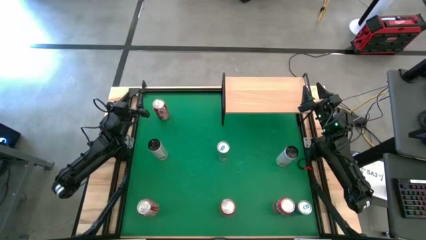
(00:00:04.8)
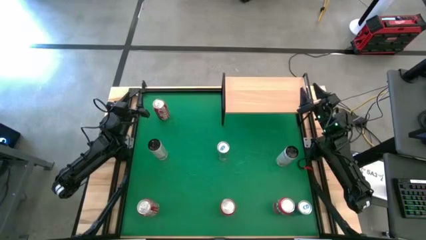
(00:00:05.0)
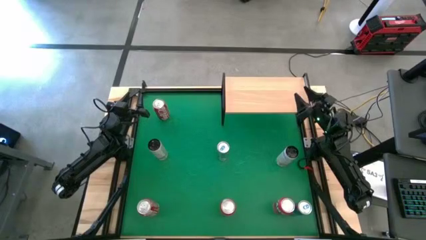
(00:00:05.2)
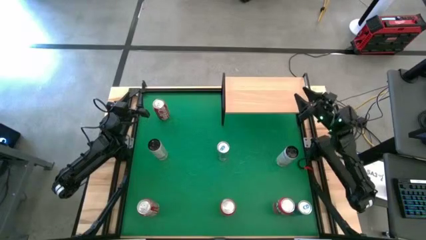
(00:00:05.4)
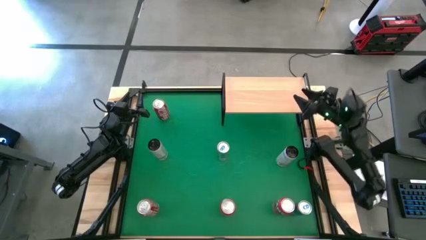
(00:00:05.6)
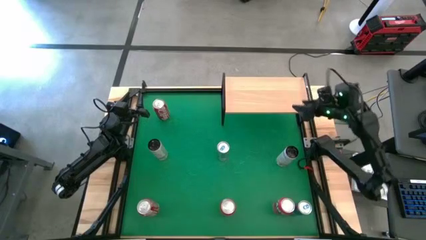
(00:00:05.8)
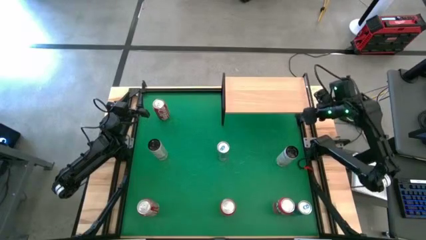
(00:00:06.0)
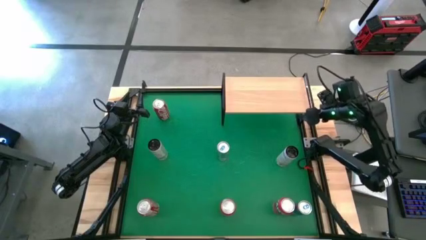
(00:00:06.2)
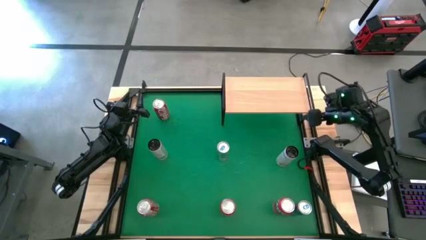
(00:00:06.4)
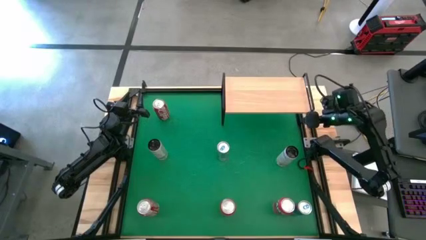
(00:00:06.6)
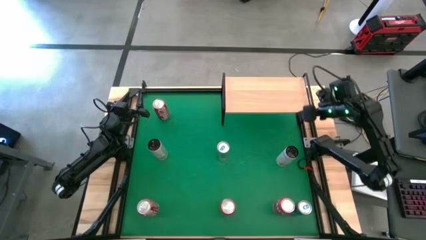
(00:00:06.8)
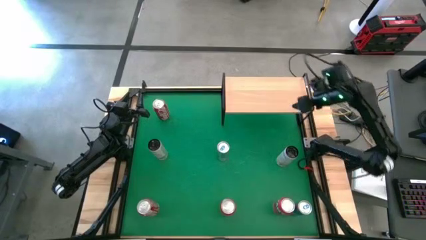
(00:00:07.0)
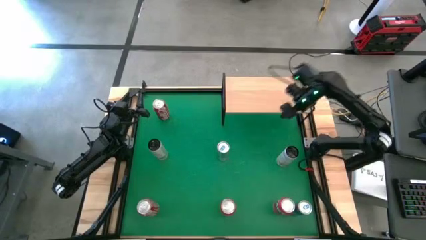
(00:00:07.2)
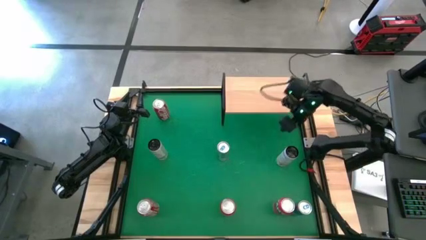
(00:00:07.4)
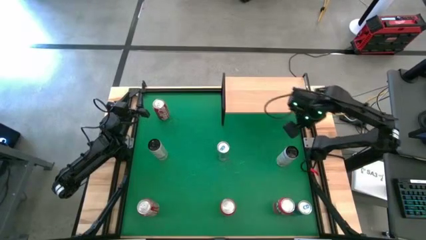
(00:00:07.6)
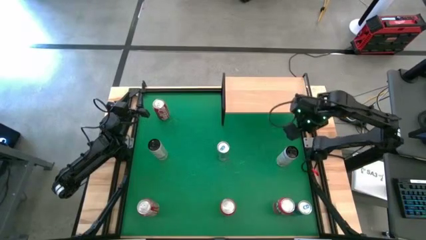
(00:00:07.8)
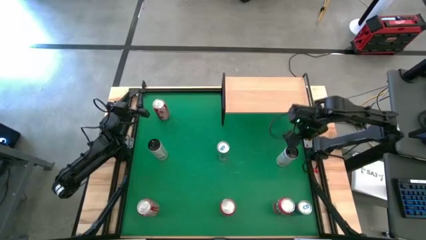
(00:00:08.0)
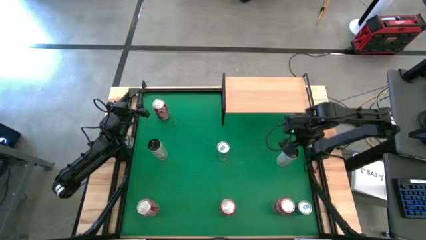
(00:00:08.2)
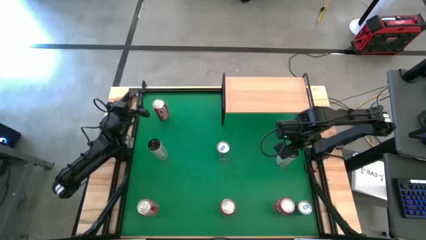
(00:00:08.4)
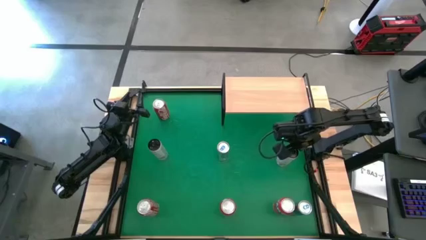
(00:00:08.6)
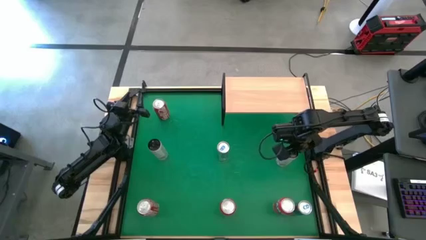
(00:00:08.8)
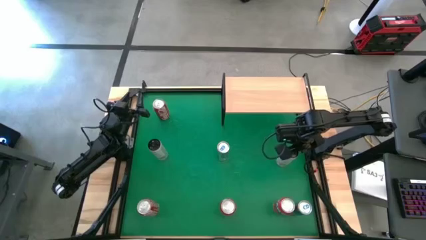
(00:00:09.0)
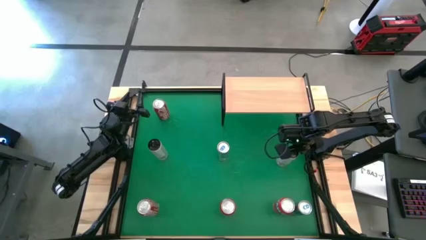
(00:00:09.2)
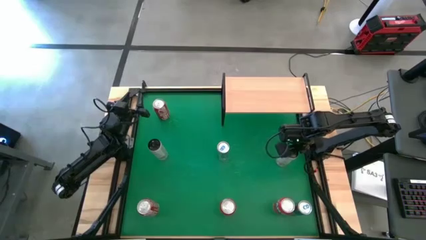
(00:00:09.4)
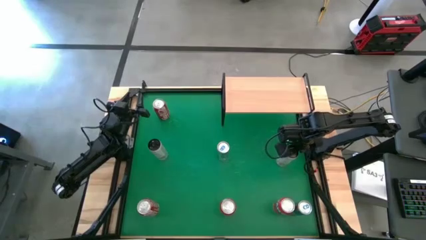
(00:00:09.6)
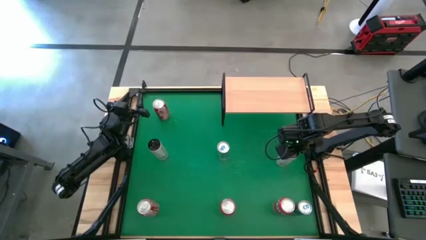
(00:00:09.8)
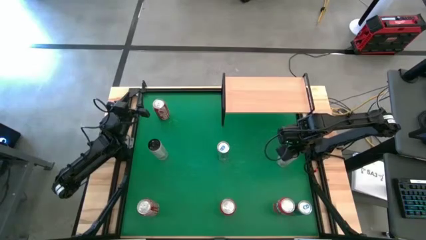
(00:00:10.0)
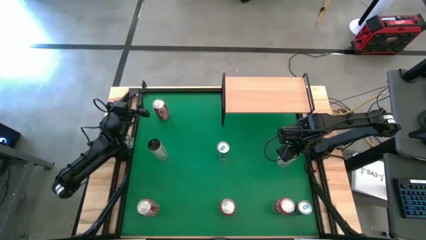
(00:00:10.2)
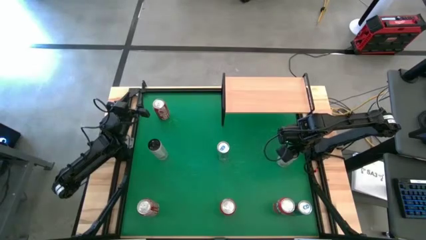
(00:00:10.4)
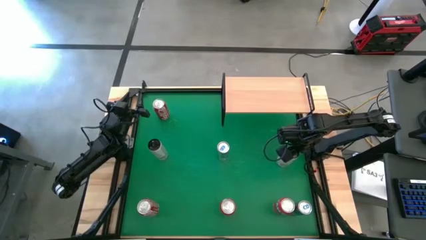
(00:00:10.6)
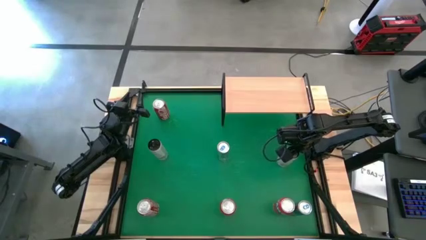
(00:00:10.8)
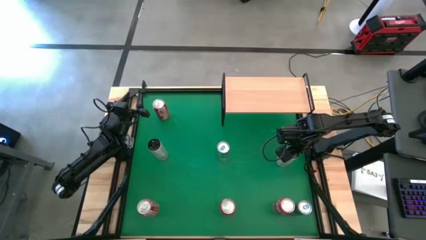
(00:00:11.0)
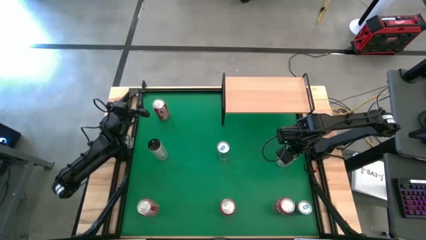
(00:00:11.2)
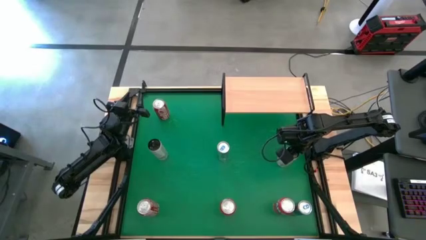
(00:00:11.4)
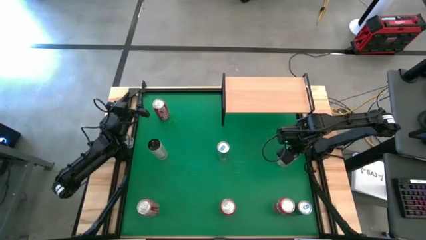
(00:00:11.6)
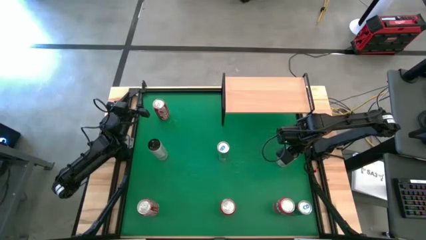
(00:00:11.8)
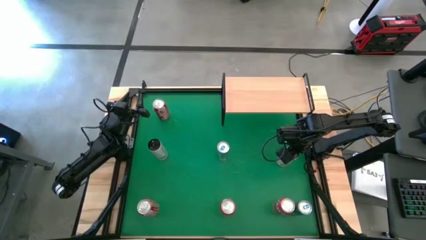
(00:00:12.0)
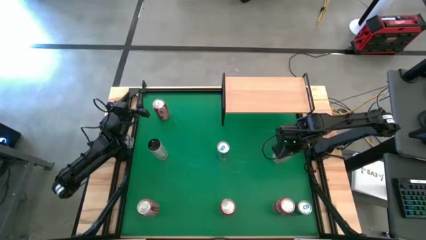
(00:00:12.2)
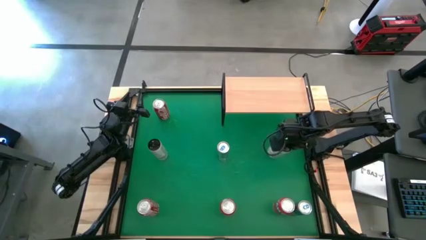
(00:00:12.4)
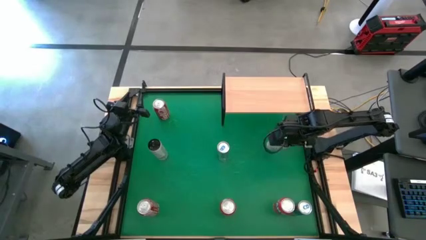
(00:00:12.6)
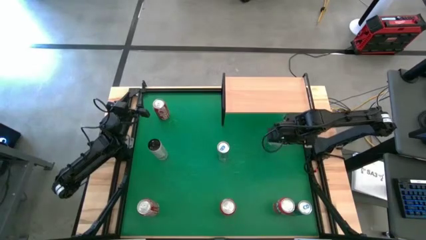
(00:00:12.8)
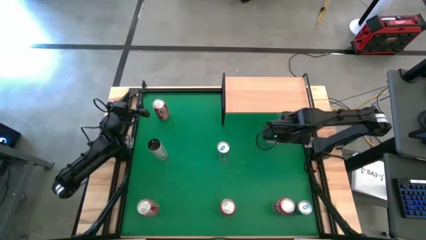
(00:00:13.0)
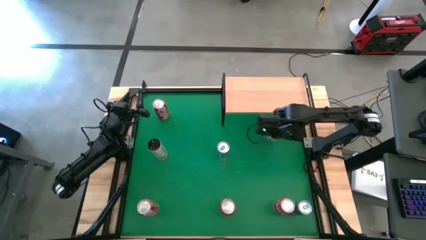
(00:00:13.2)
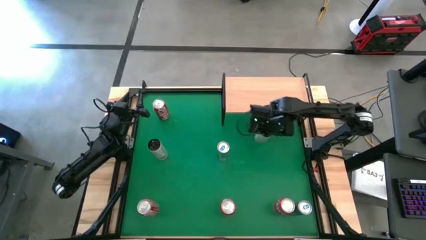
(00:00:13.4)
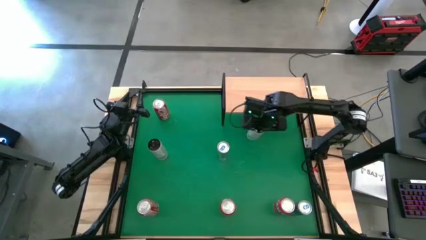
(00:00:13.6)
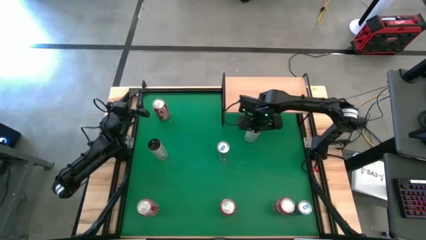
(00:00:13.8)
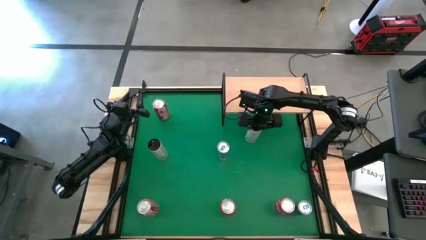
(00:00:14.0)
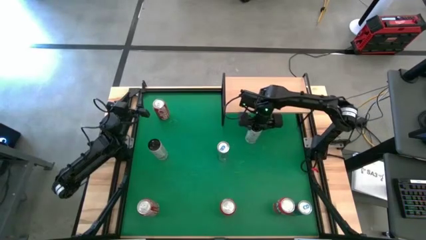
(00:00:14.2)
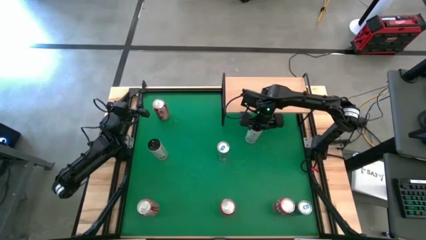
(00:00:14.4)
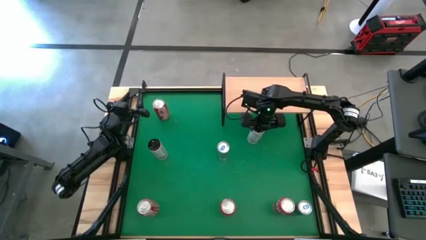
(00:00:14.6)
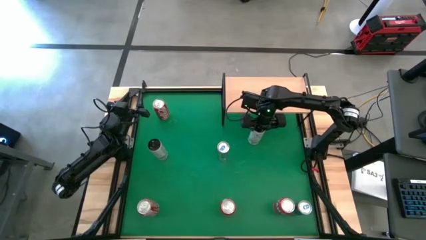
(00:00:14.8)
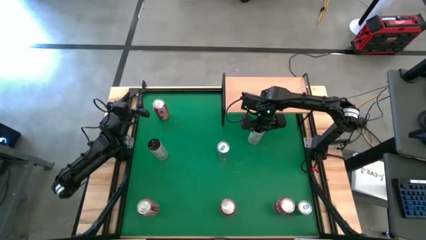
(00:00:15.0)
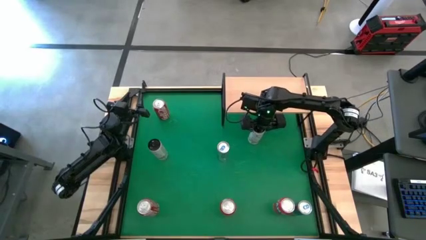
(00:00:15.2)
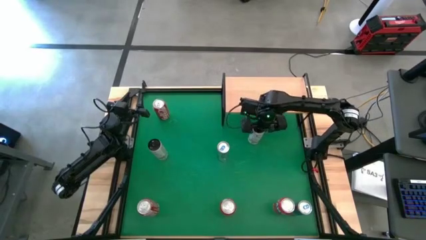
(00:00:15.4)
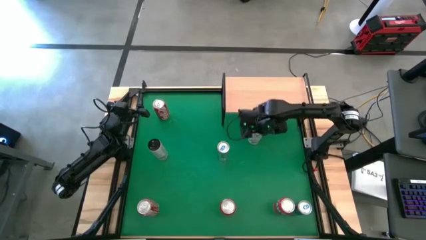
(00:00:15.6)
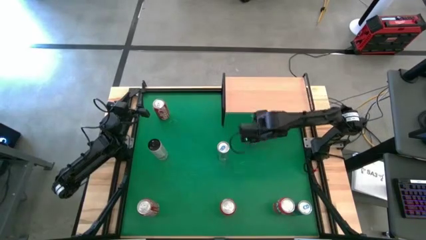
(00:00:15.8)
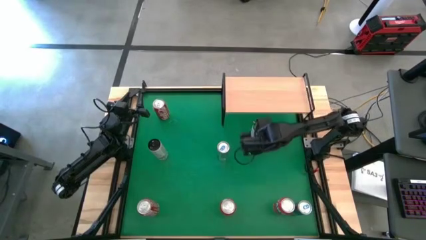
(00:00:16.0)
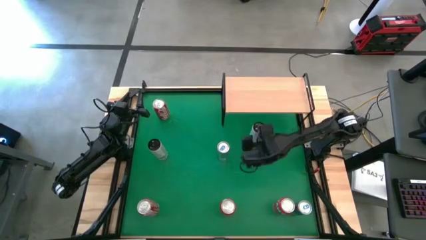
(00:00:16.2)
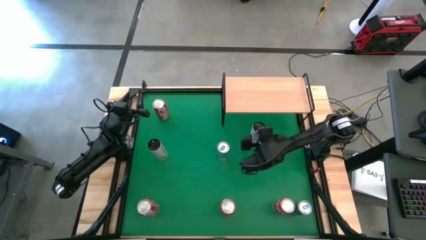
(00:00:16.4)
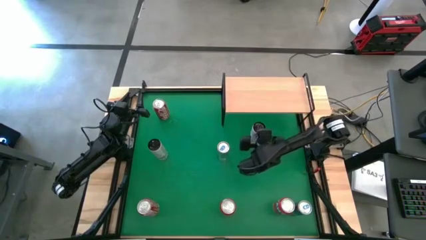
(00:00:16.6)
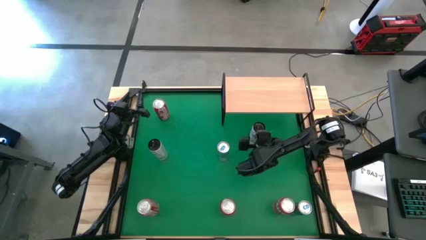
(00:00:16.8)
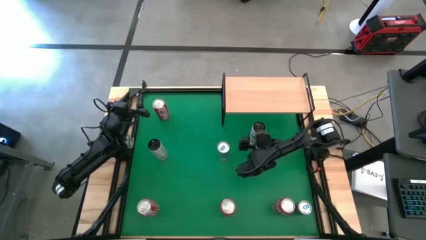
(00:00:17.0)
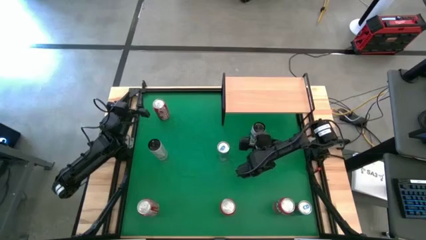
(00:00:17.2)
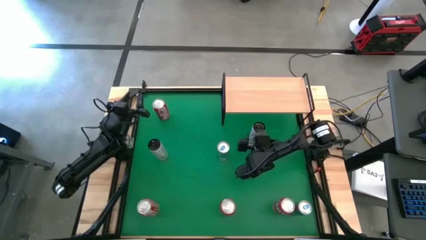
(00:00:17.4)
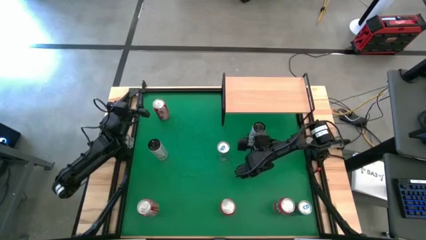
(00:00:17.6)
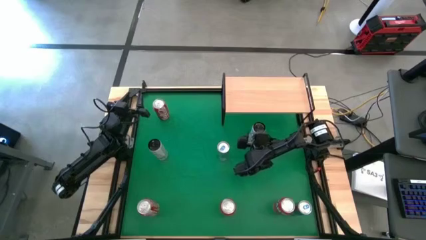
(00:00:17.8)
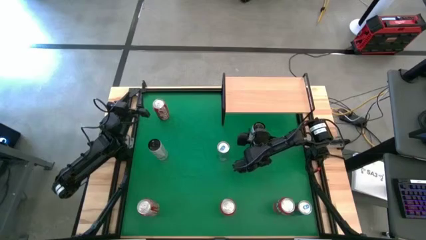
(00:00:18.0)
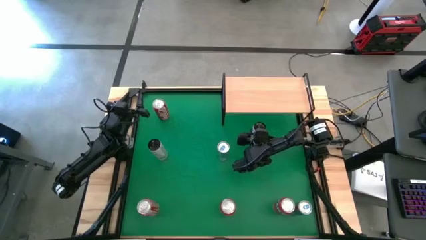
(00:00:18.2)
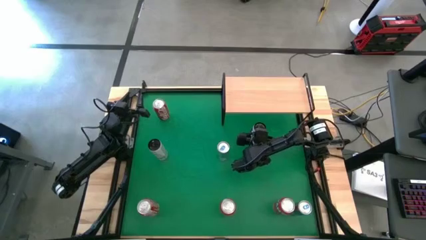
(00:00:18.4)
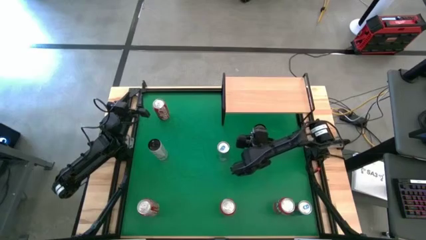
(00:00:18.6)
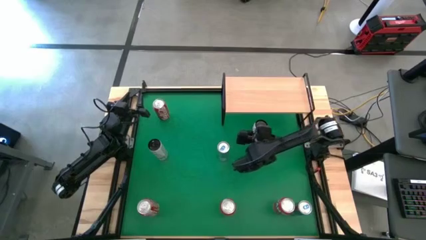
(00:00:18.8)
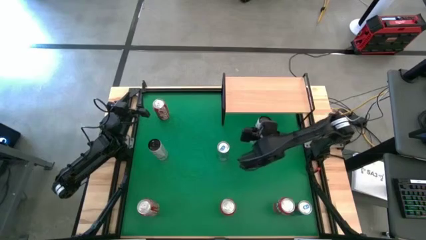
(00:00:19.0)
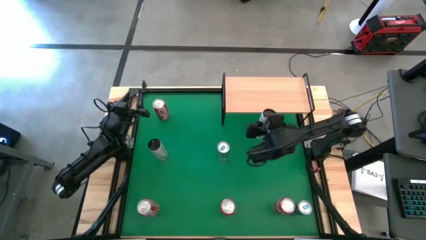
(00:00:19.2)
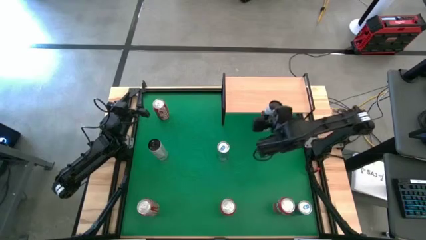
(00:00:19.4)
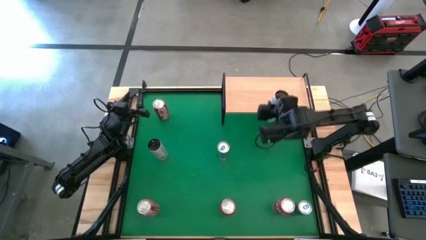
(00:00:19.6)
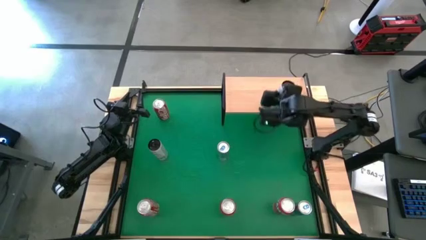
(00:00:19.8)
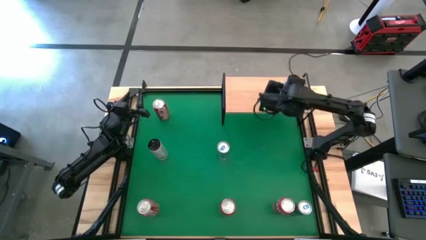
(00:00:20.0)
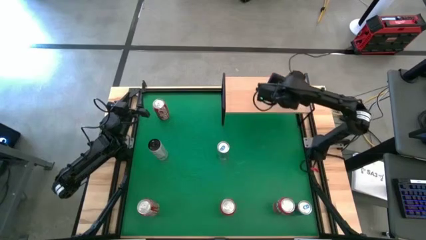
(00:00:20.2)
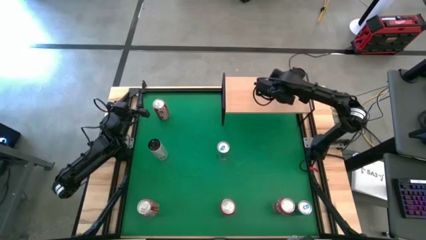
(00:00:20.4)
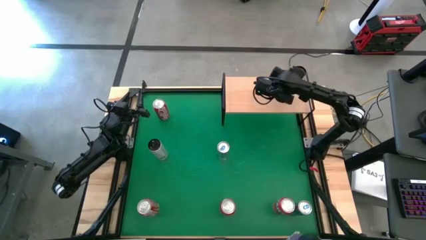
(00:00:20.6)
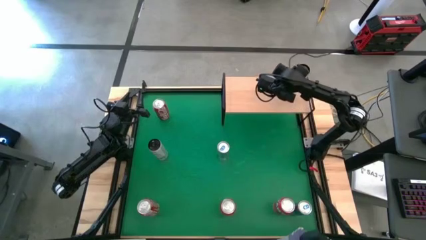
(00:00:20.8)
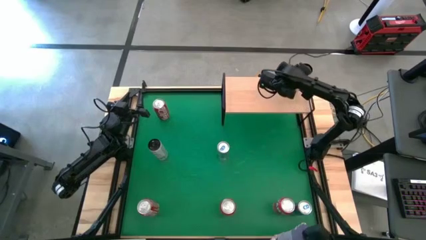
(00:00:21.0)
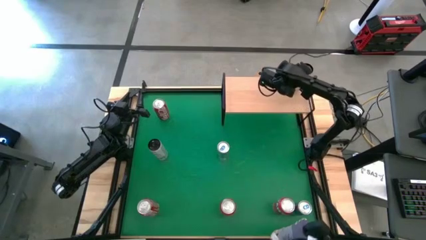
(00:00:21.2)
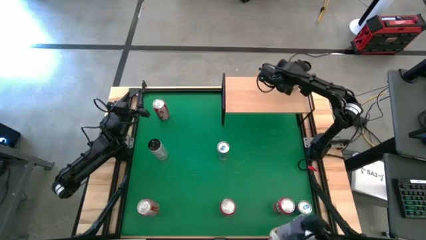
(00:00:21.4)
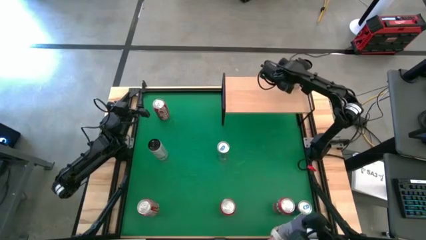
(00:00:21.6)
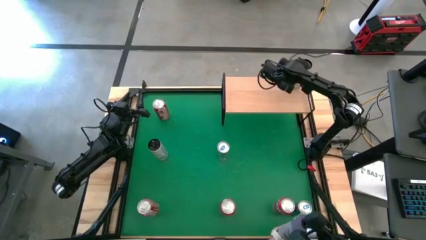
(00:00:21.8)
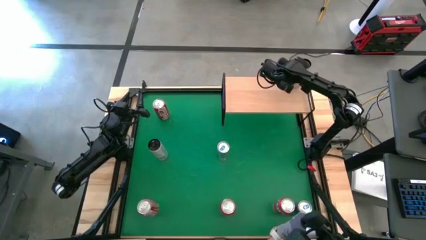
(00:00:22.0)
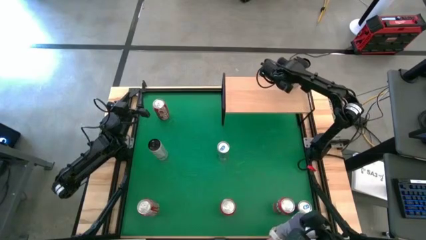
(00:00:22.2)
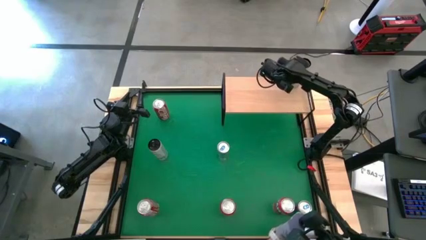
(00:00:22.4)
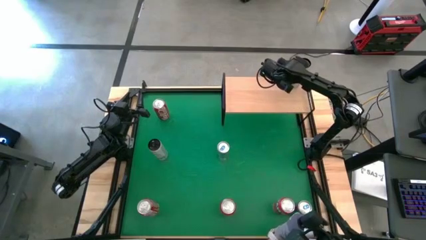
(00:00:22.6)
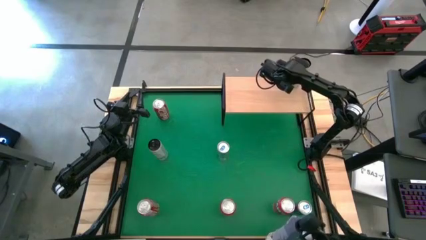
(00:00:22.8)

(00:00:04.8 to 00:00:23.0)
Task: Place canned beverage on shelf
Put the right white yellow soda can on the shelf
